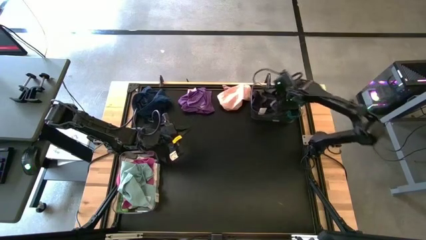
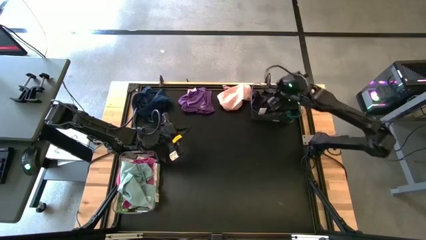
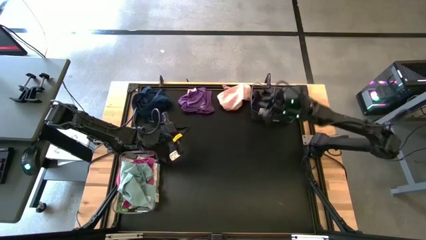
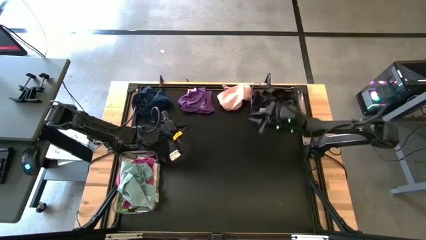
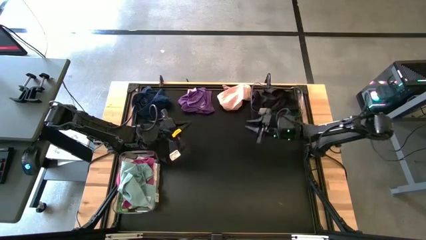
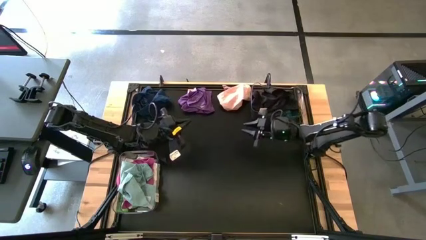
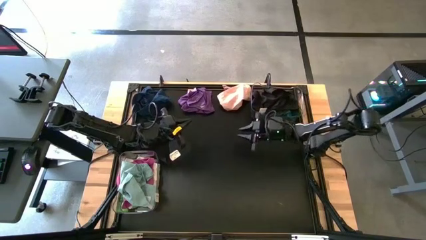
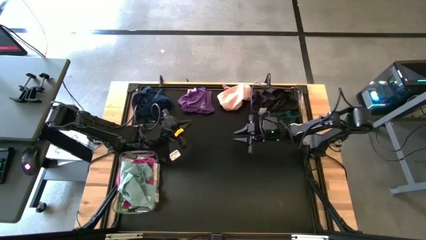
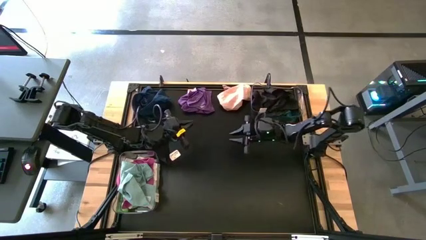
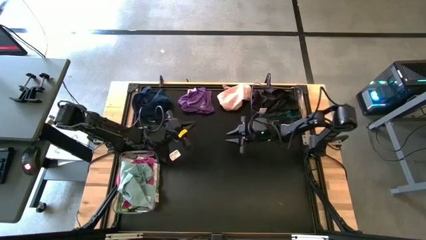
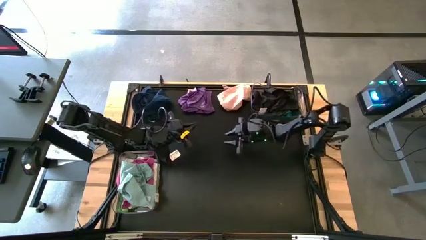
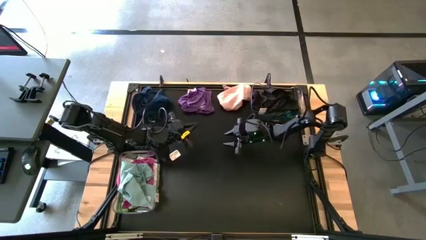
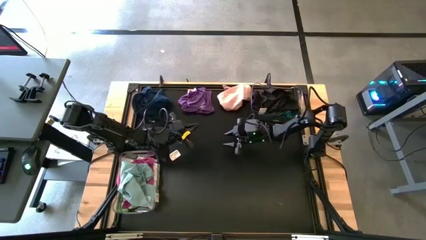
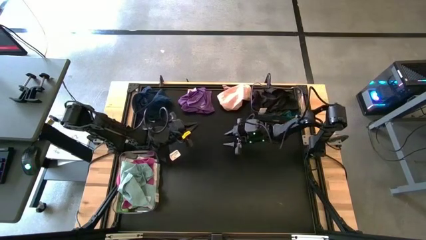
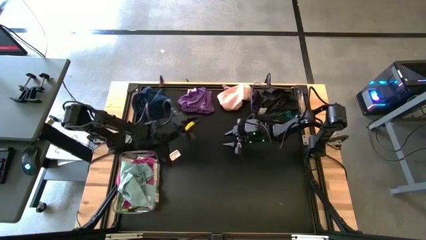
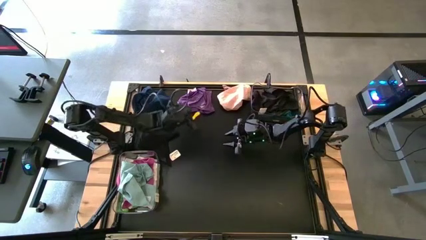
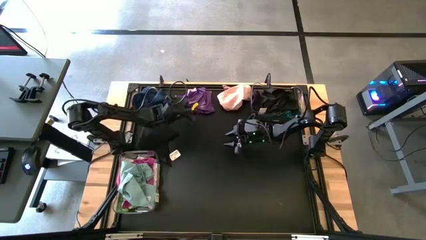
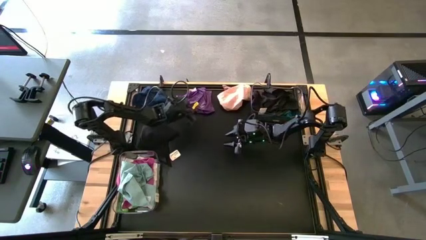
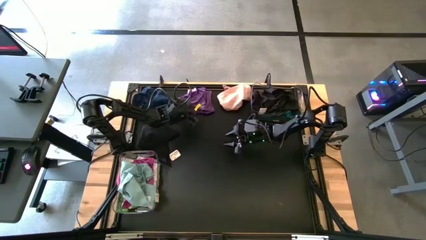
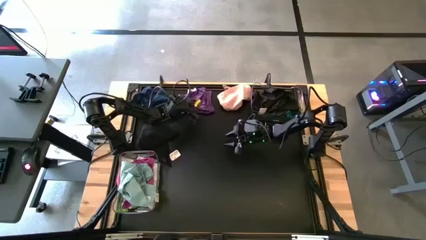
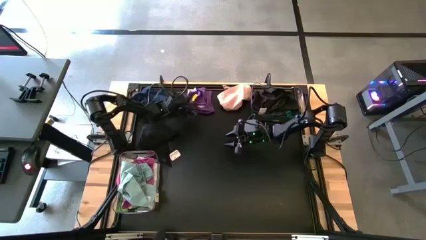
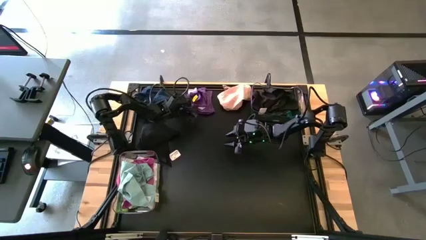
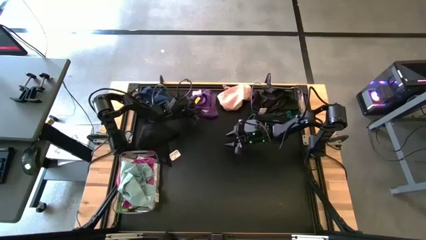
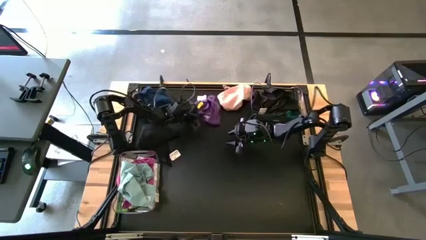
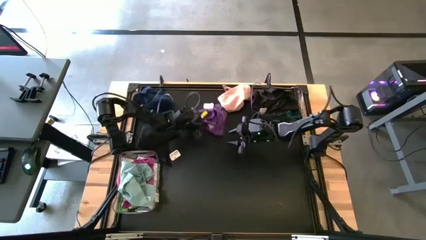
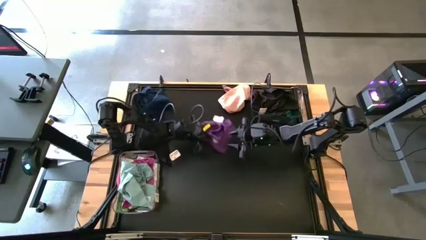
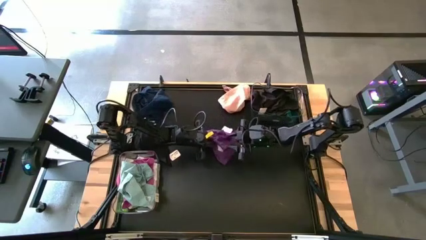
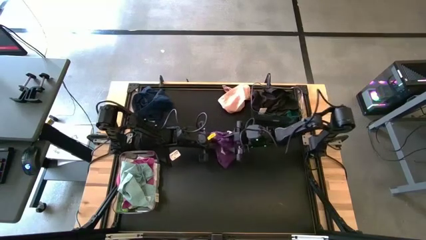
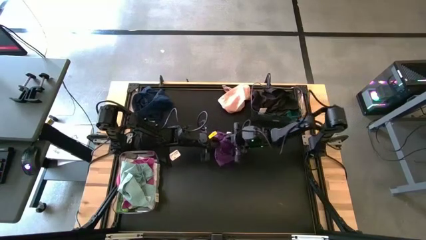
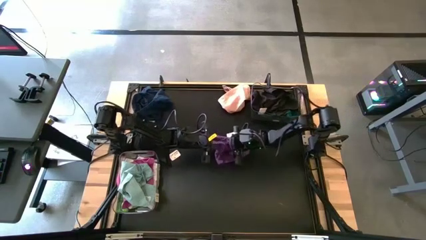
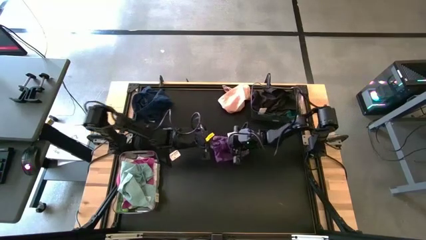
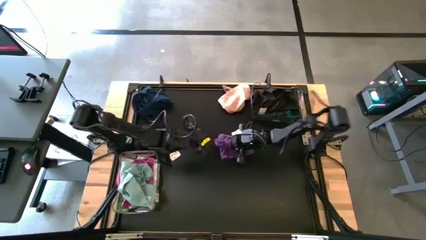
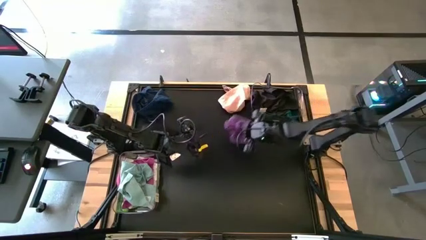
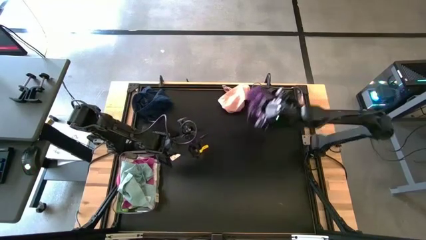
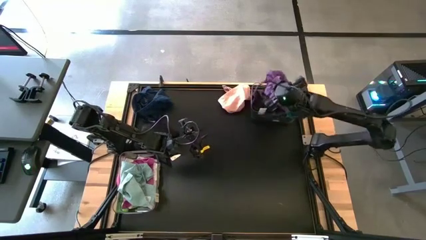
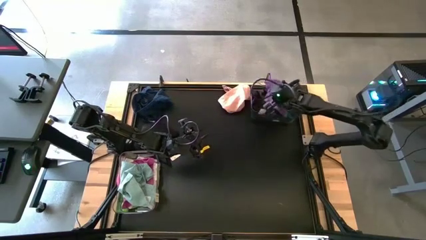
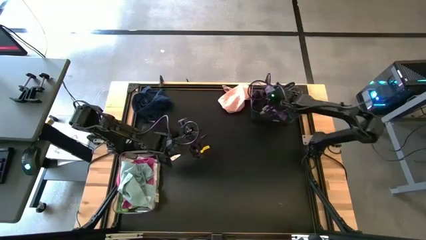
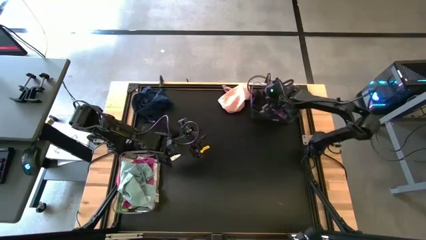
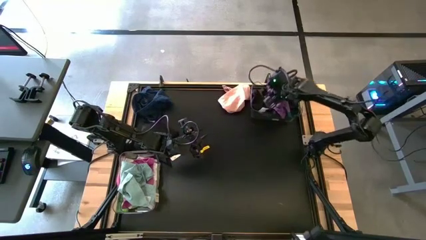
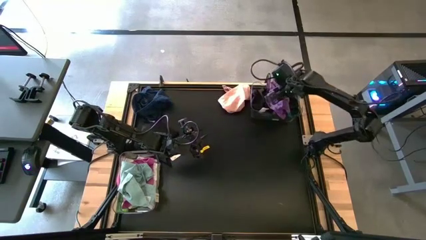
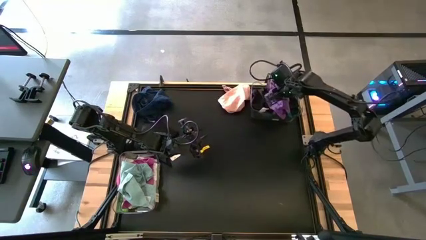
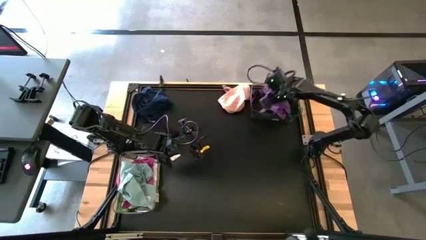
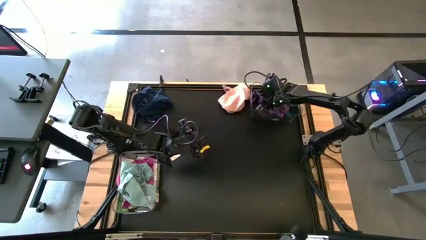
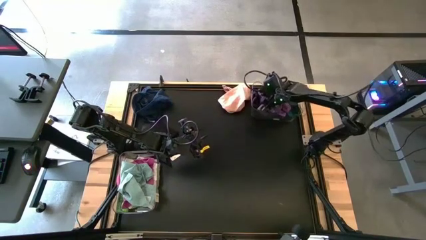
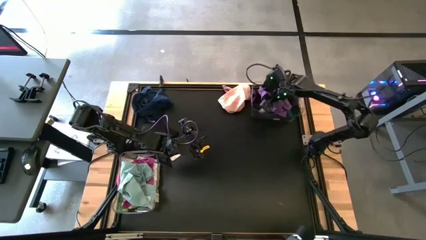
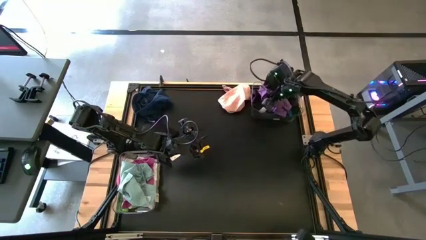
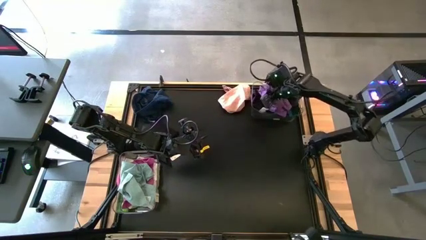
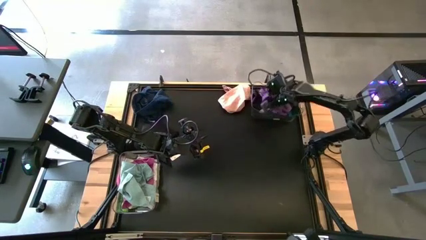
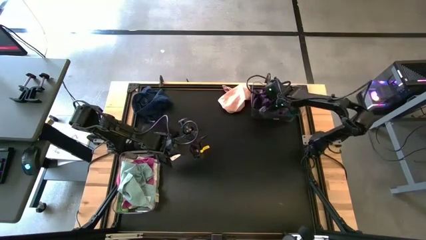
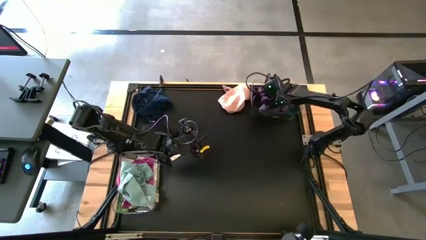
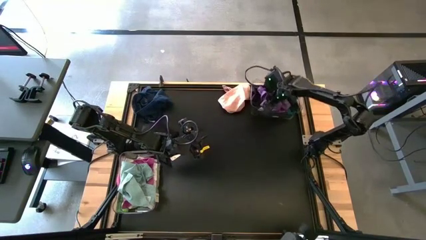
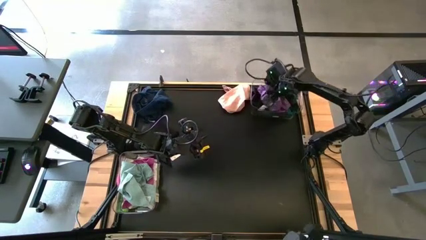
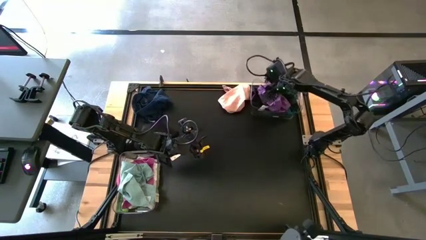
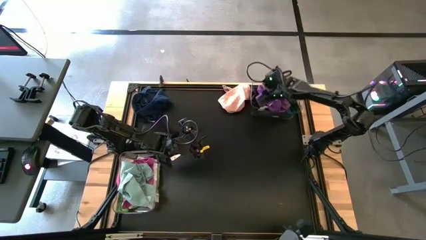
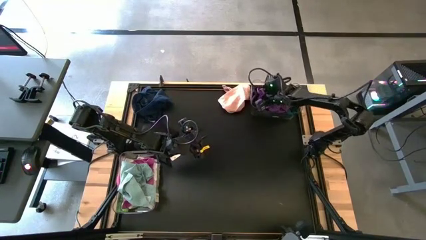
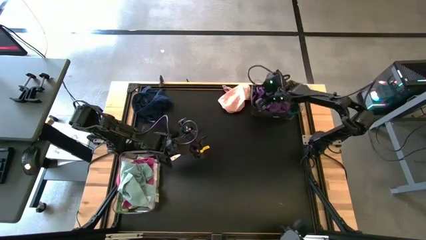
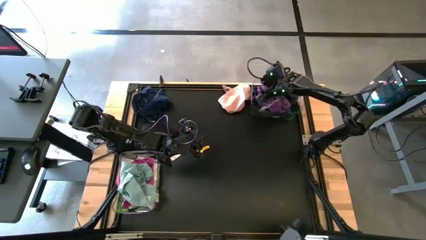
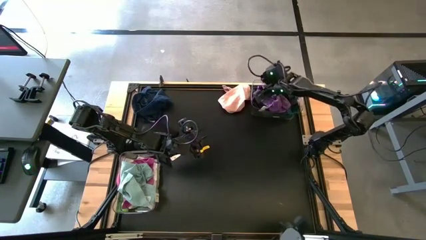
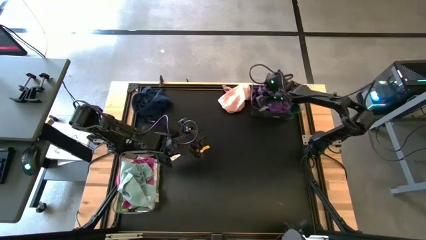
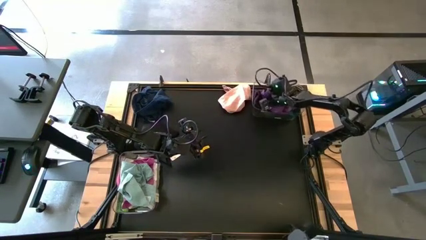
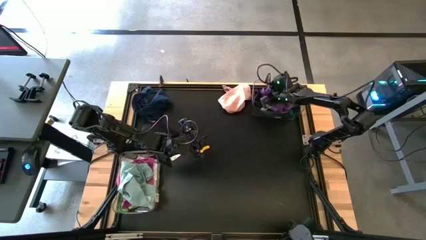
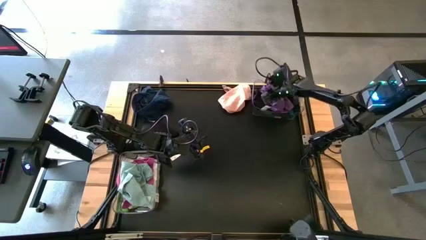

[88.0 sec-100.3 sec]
Task: Sort towels by color in basket
Put the purple towel into the top transparent bin

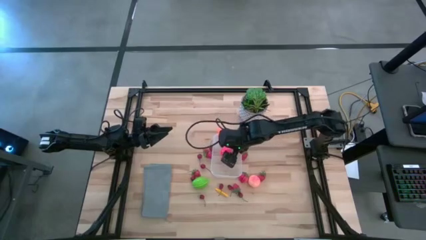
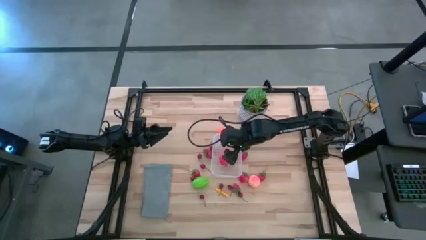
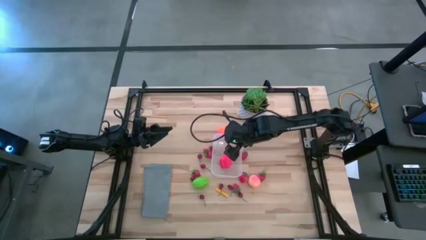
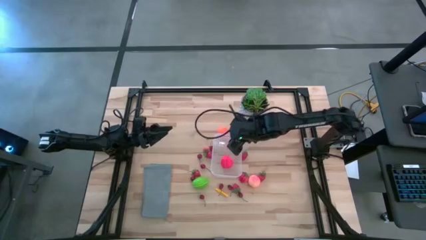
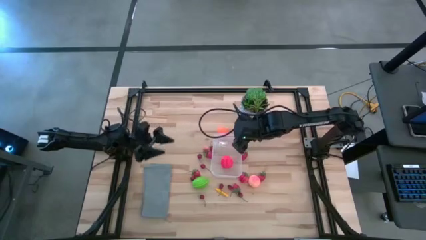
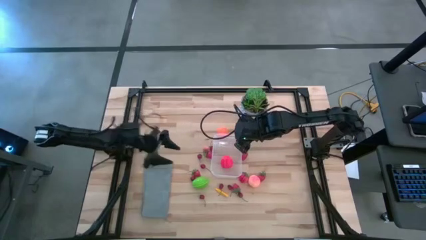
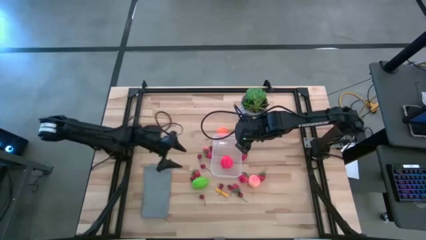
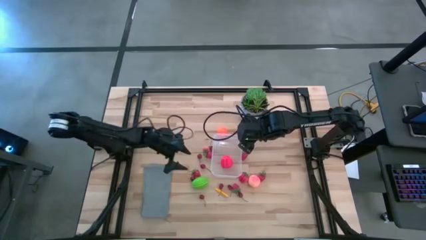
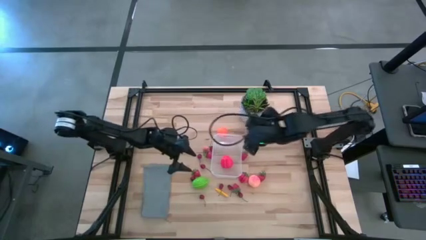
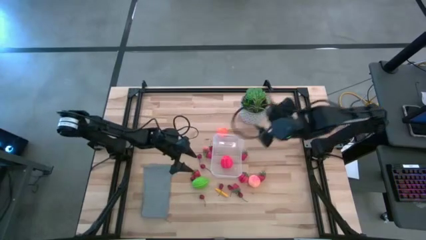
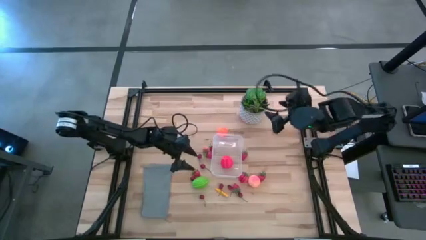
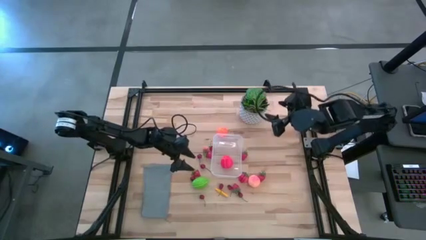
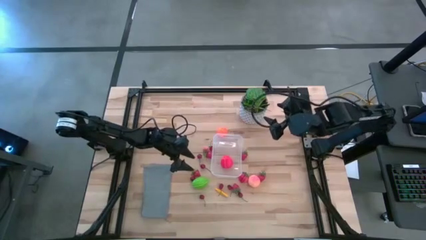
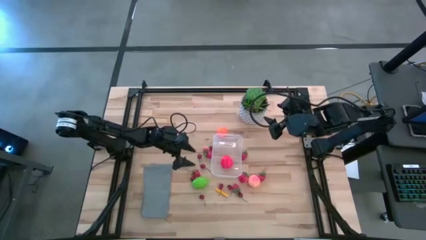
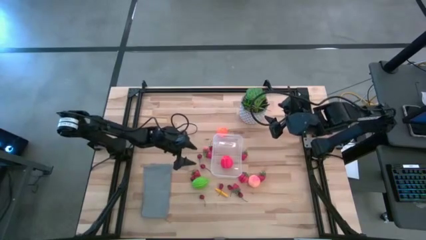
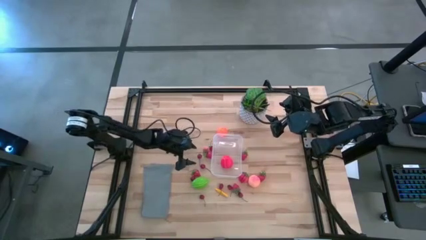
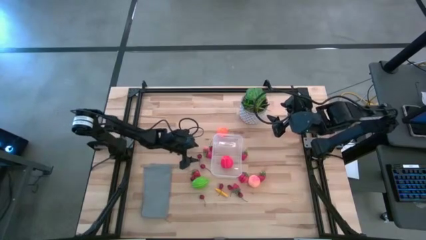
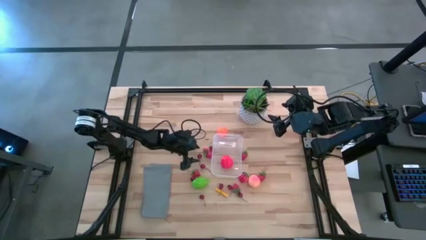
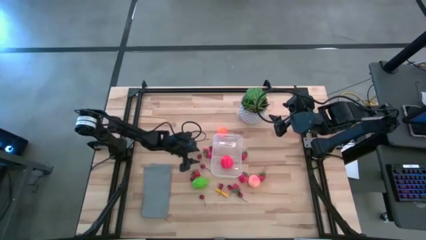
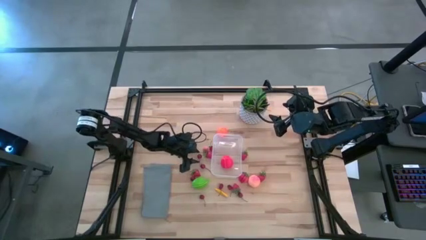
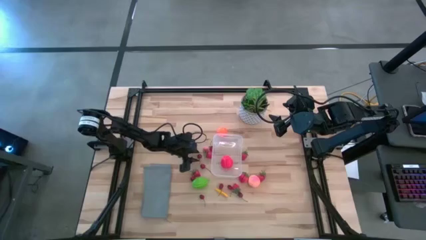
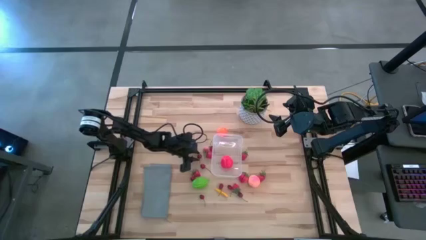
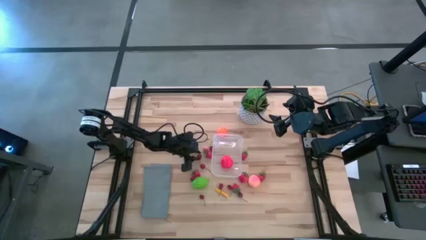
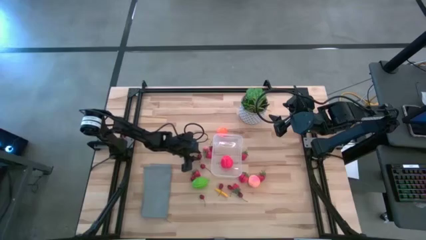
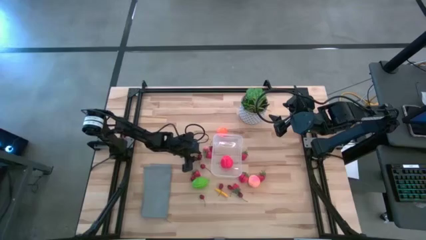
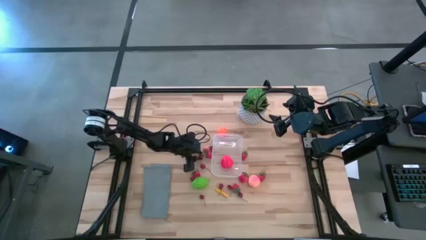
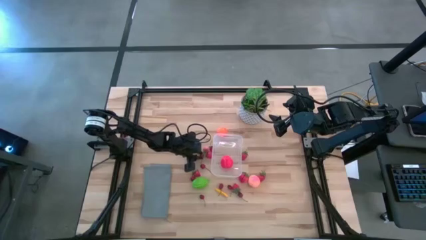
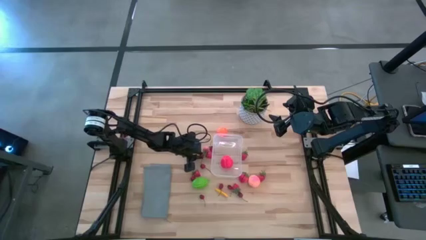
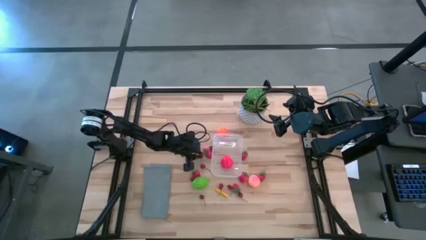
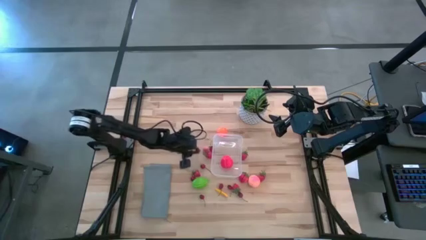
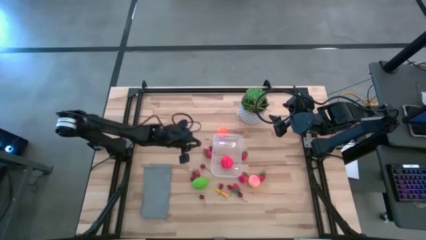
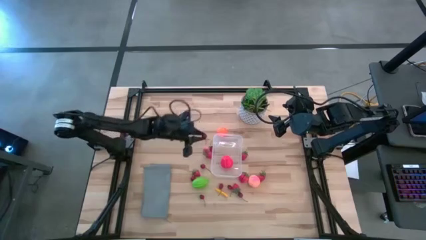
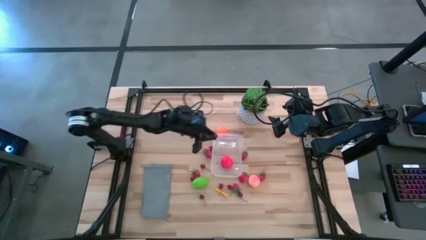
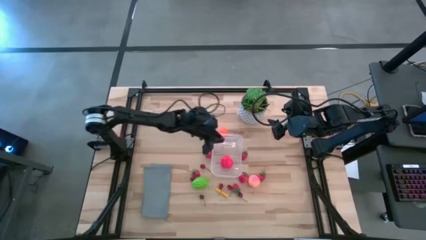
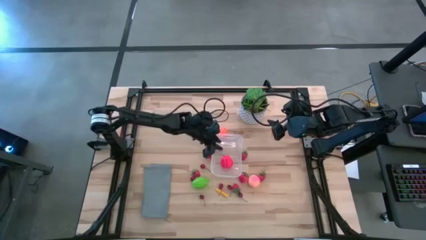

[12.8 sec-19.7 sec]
Task: Pick and placing Produce into tupperware
Put the red cherry into the transparent bin
